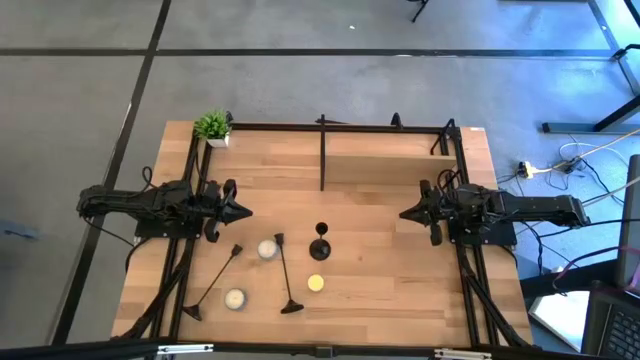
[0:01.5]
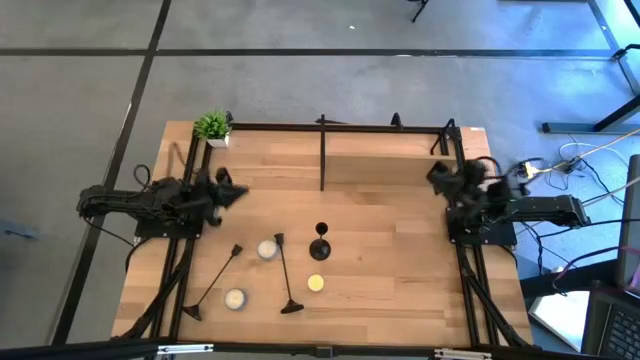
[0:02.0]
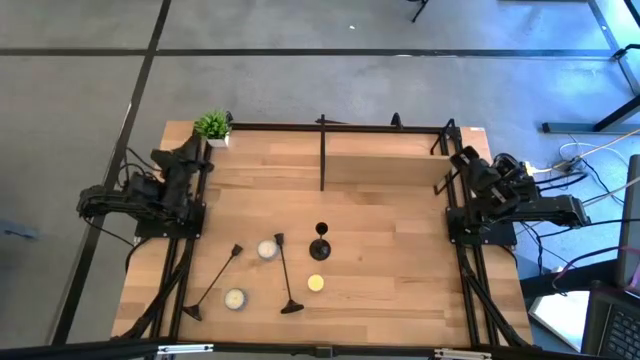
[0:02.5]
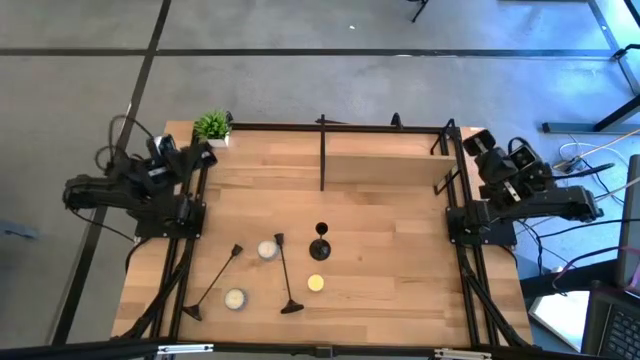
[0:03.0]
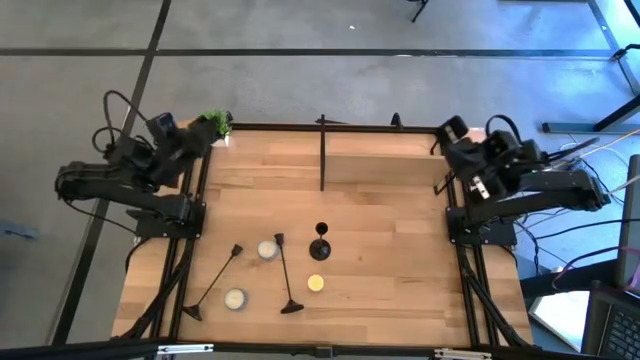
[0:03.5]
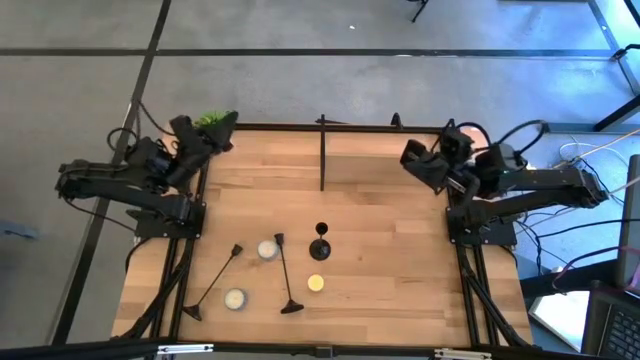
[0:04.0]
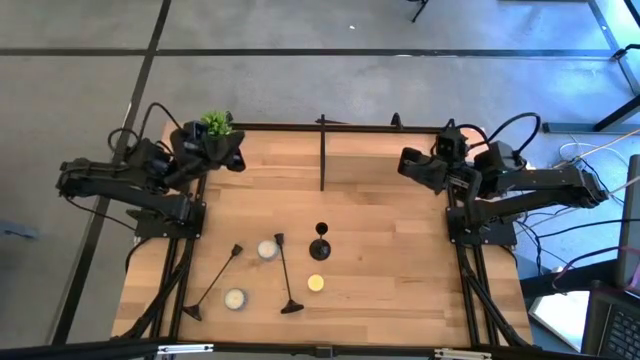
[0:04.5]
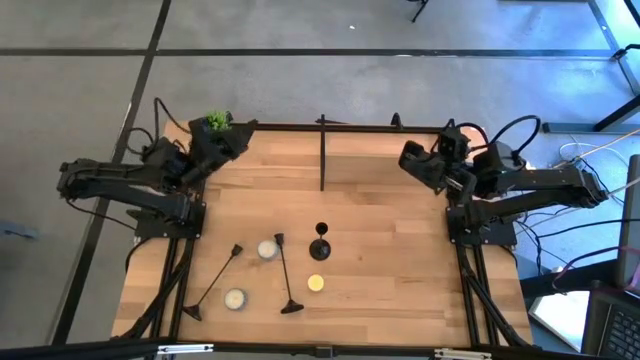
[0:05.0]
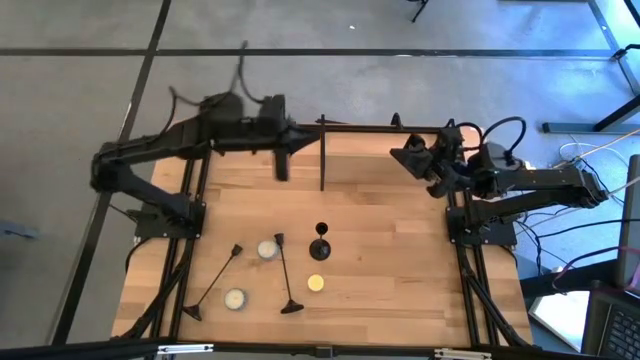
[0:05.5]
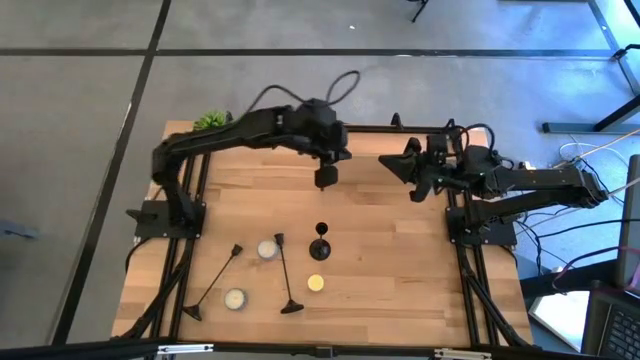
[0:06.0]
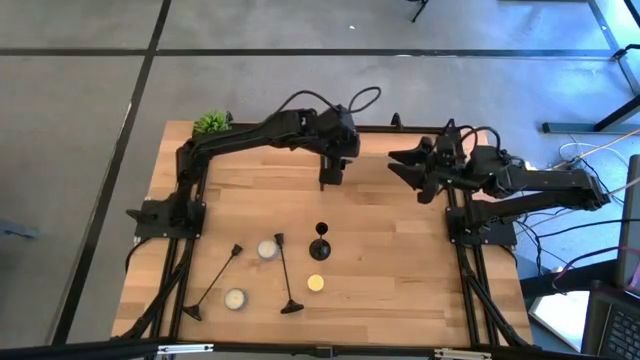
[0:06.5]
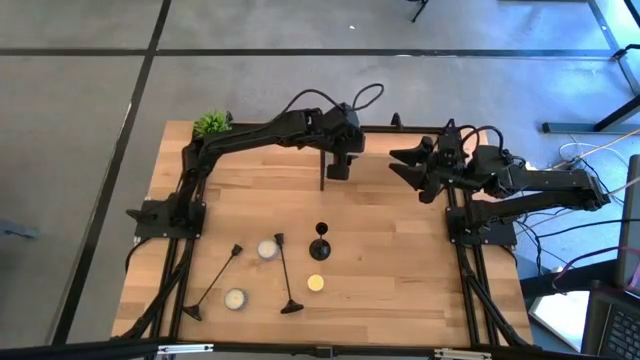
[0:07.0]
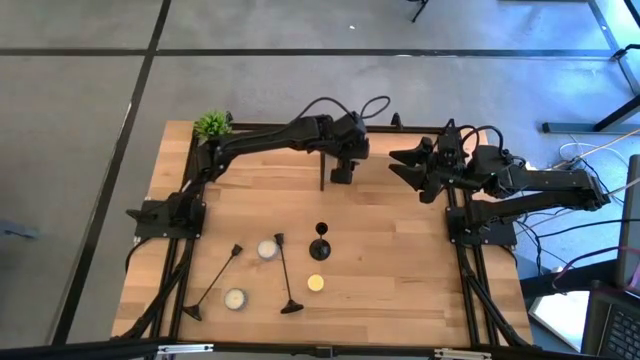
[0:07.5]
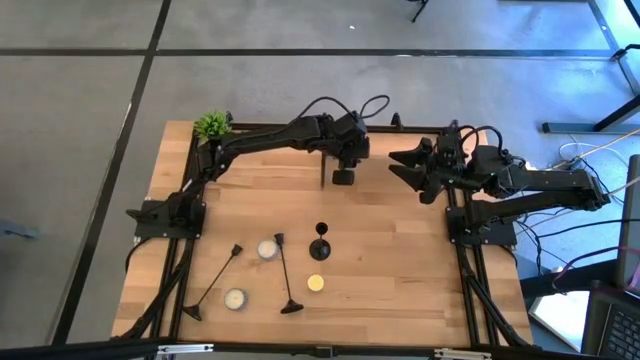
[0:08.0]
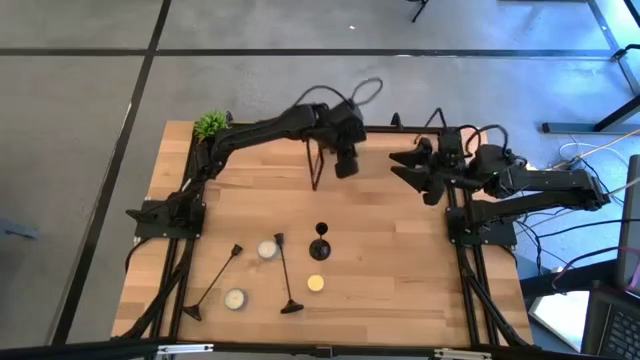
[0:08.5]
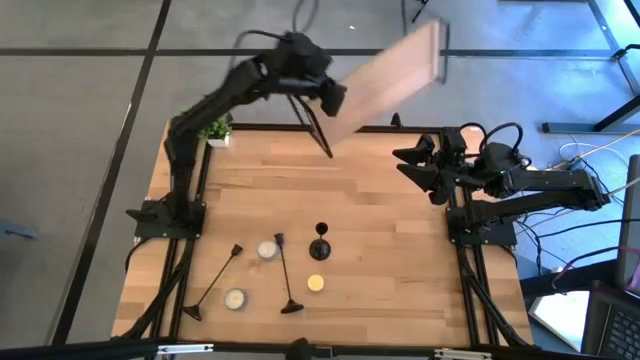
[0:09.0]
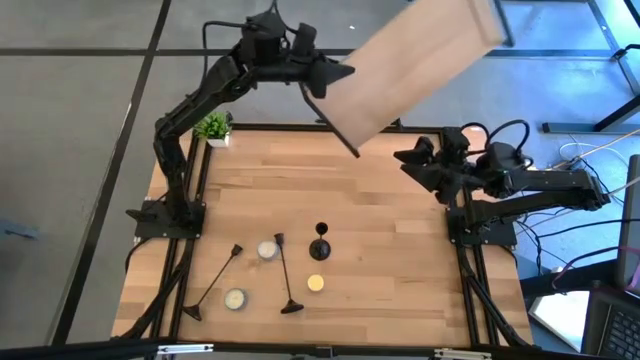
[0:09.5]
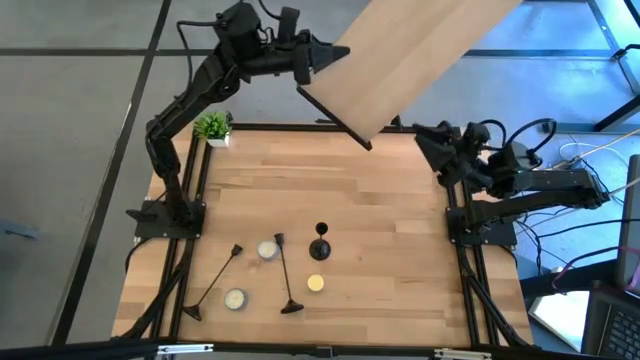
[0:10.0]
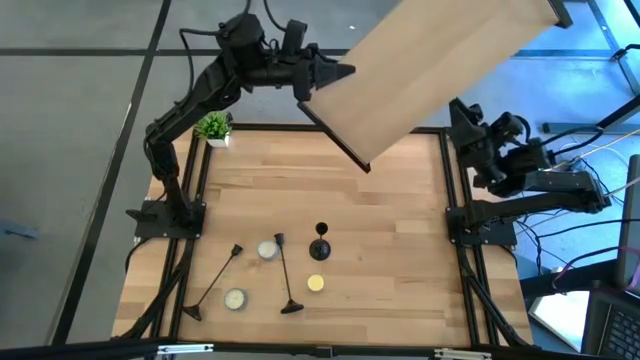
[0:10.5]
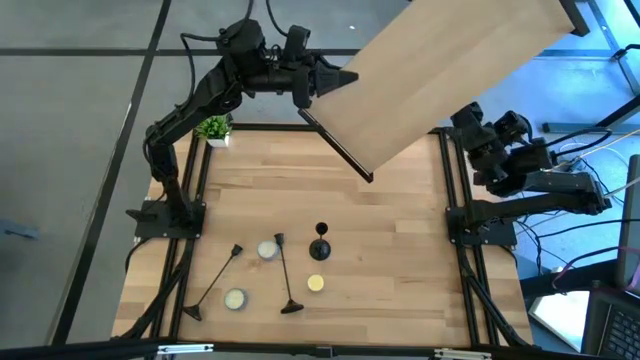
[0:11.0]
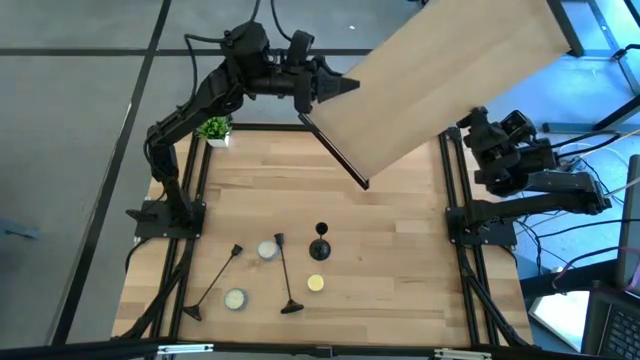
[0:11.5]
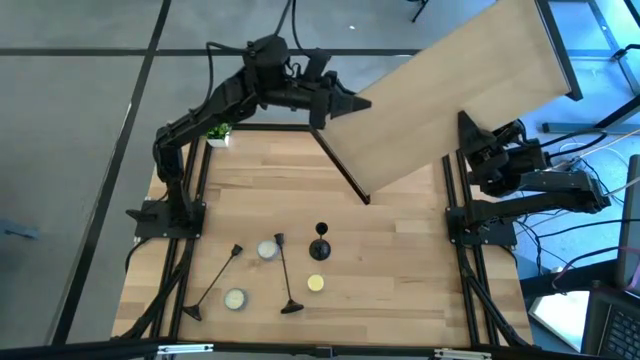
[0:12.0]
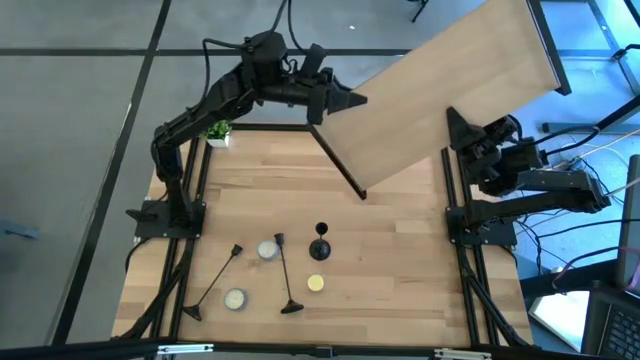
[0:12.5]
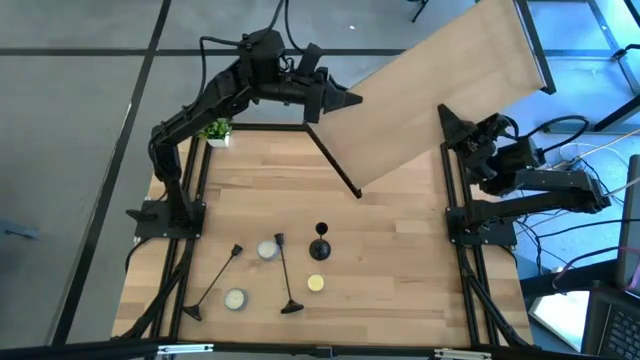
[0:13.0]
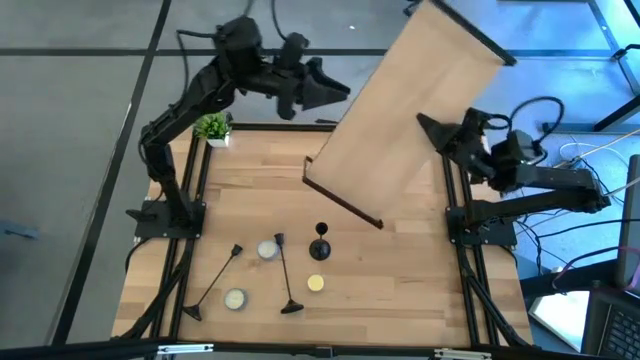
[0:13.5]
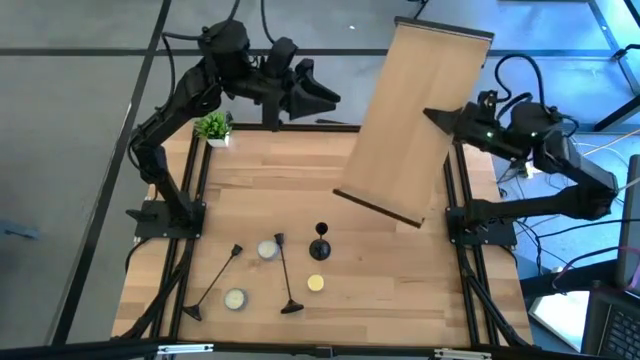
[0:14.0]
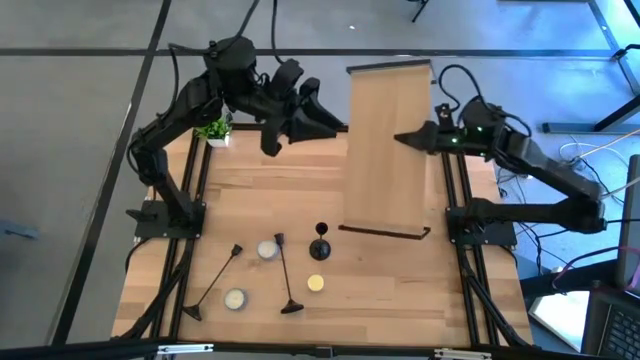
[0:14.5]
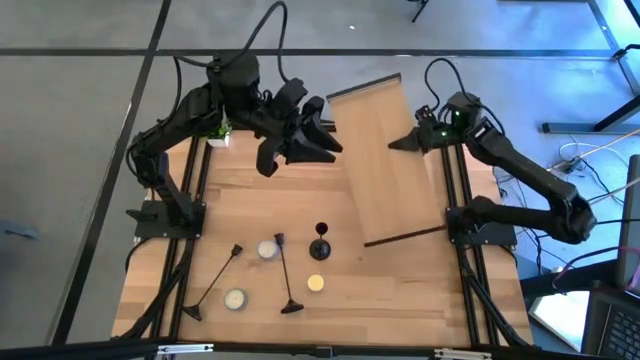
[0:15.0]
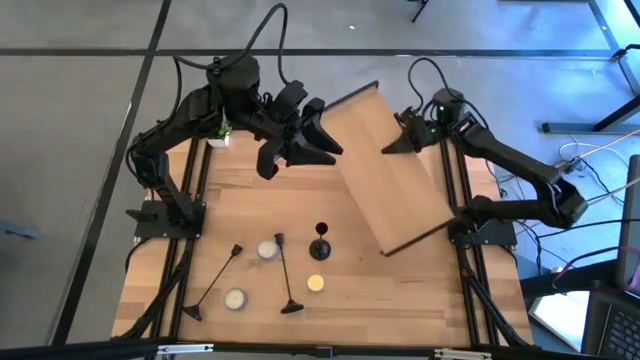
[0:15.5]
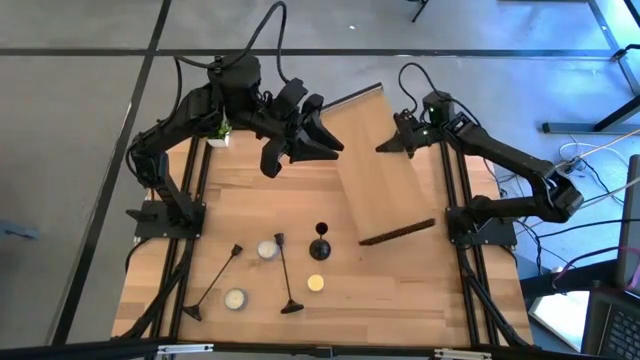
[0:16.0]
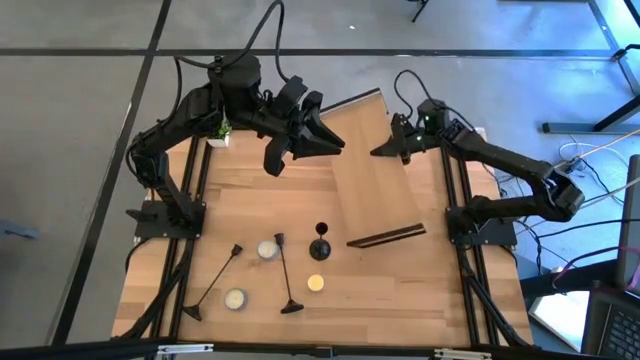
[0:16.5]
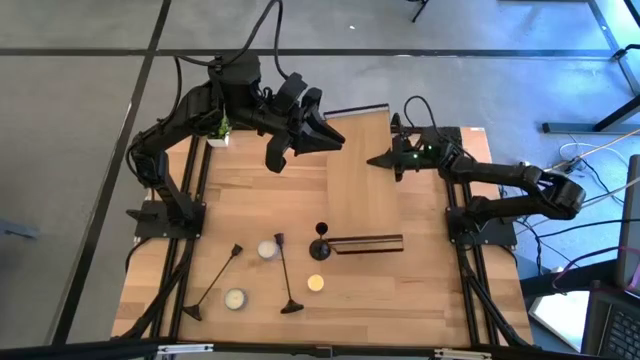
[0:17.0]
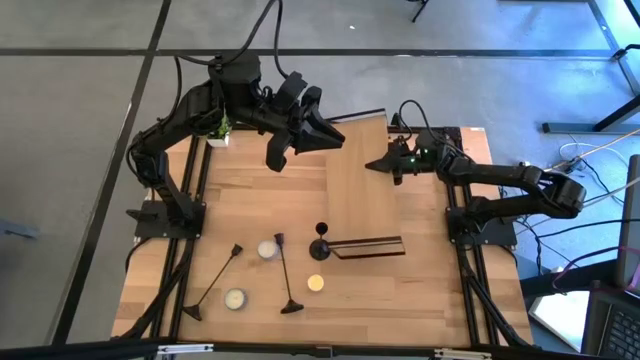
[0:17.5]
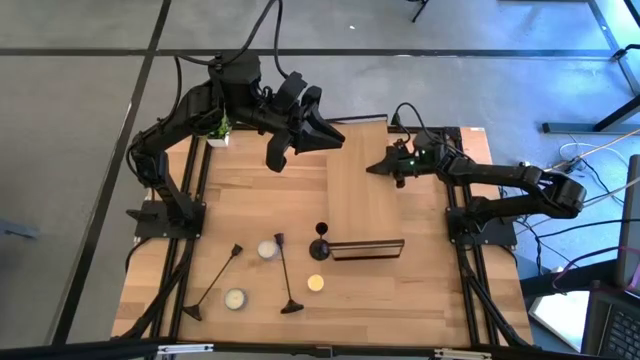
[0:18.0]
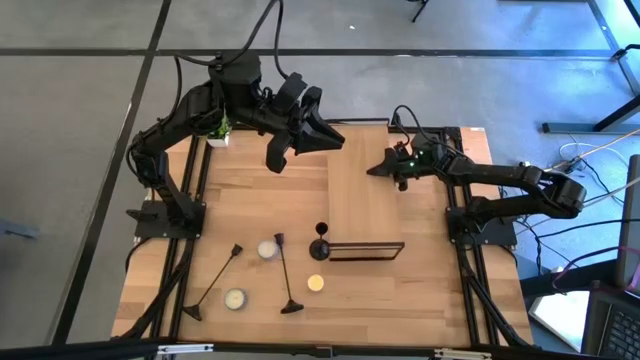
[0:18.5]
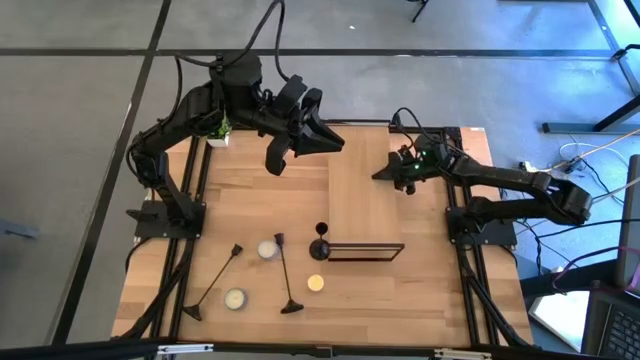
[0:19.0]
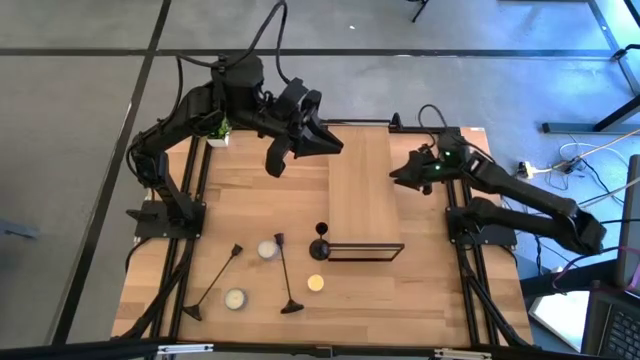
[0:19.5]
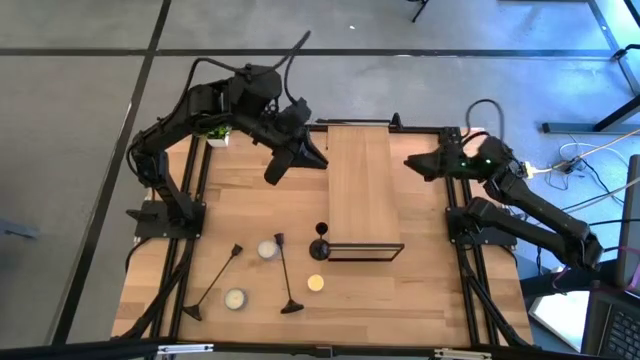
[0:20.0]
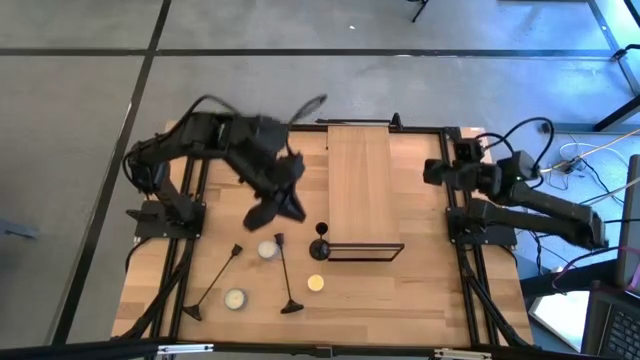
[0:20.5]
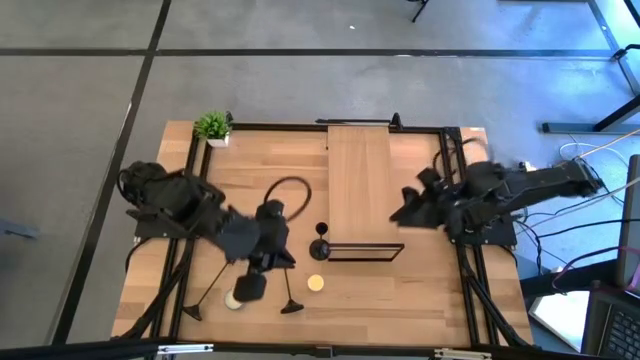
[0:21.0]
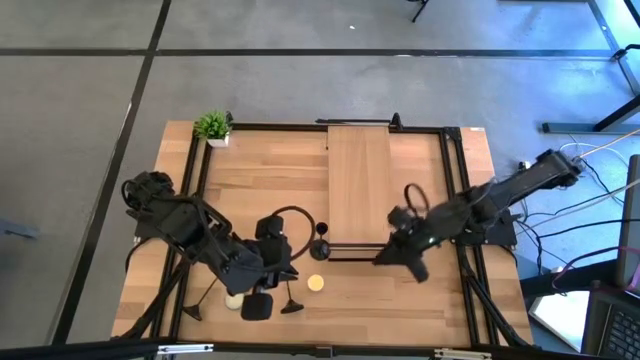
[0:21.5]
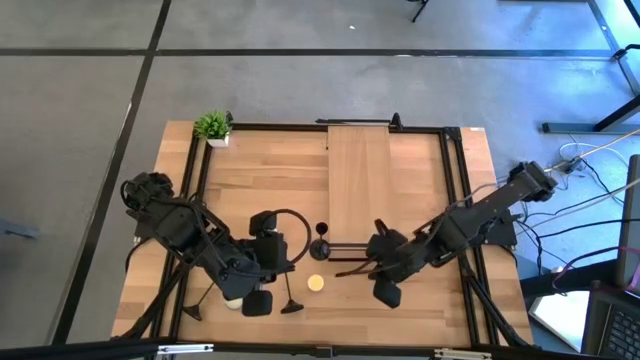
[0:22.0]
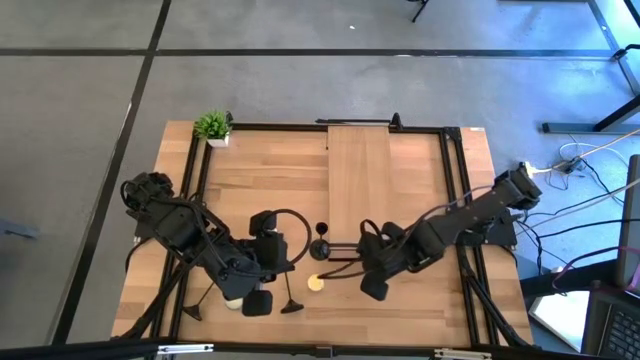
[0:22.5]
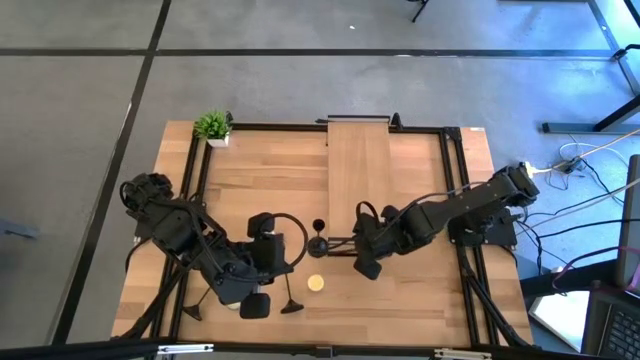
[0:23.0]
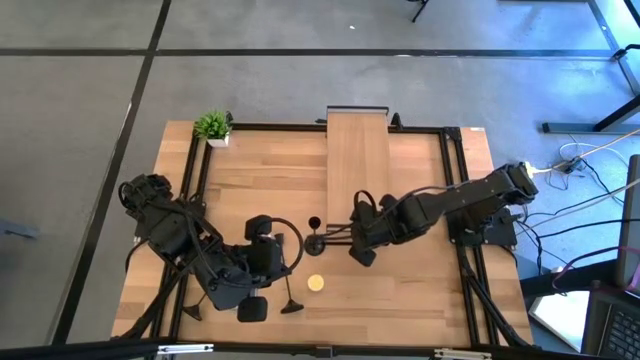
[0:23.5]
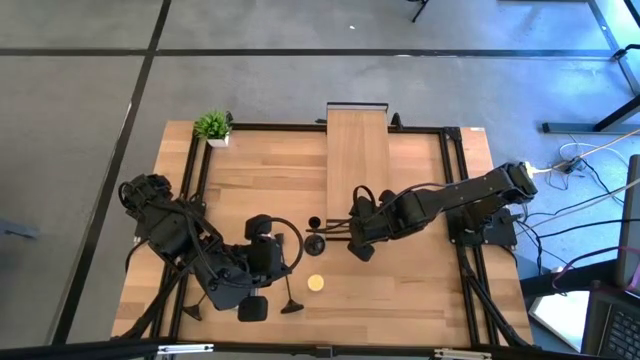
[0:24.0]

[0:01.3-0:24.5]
Task: Pick & Place candle stick holders
Prepare the shelf to begin the demonstration
